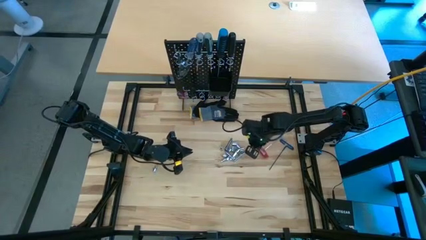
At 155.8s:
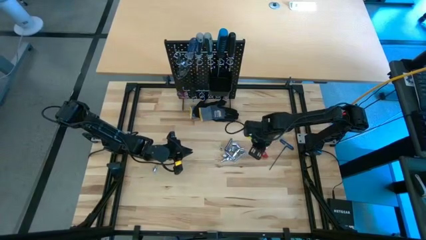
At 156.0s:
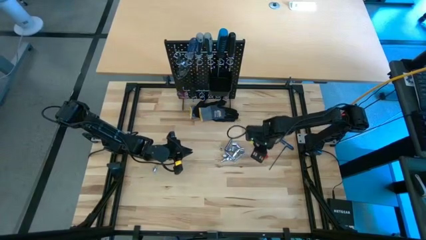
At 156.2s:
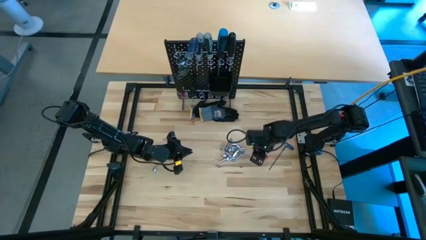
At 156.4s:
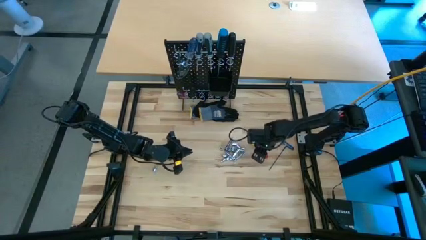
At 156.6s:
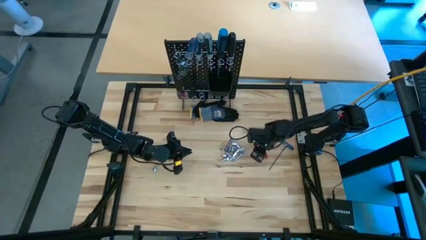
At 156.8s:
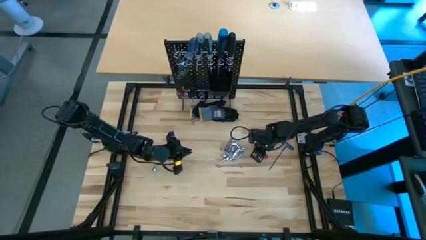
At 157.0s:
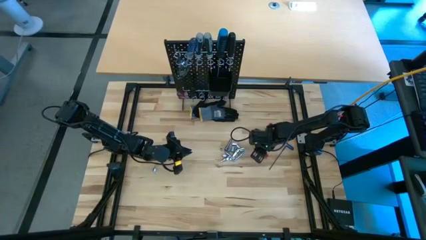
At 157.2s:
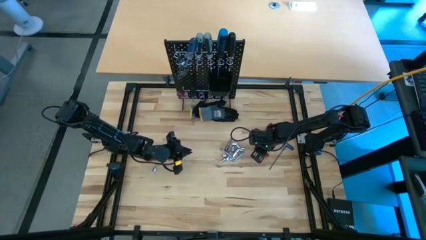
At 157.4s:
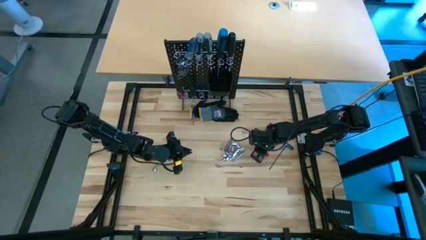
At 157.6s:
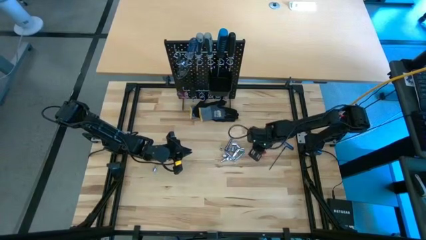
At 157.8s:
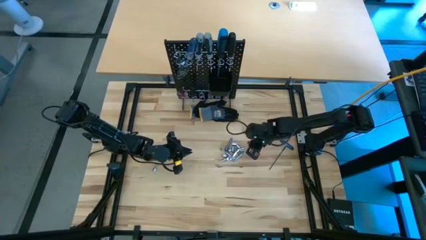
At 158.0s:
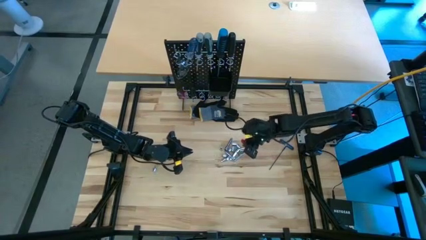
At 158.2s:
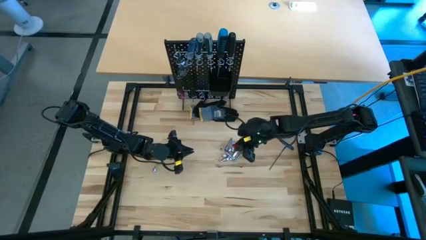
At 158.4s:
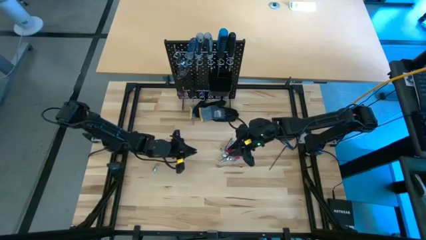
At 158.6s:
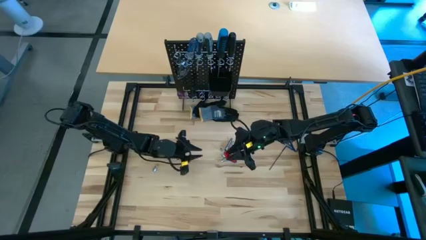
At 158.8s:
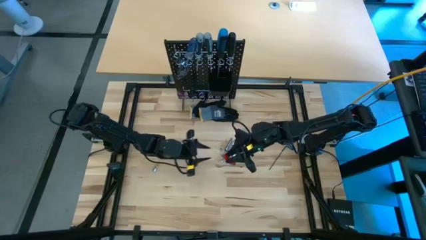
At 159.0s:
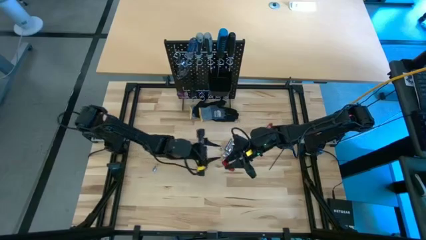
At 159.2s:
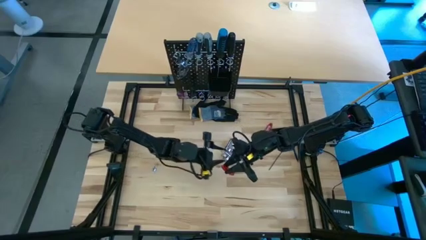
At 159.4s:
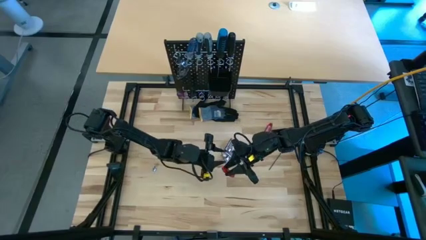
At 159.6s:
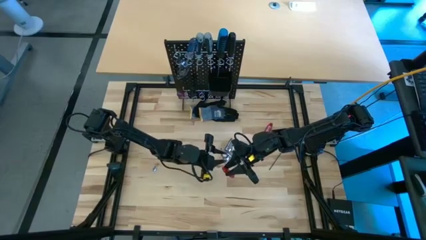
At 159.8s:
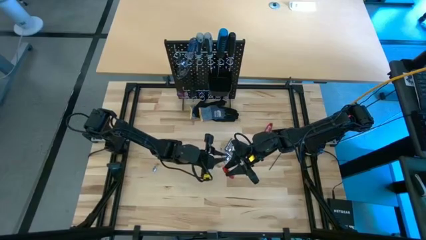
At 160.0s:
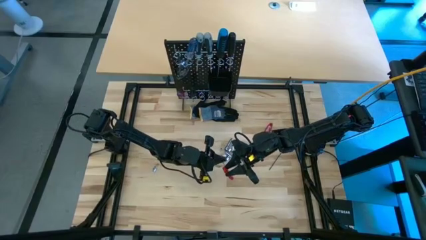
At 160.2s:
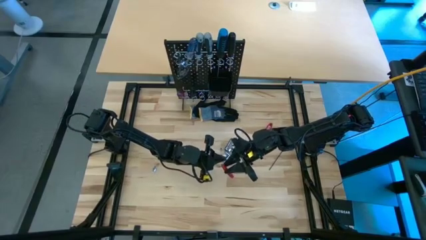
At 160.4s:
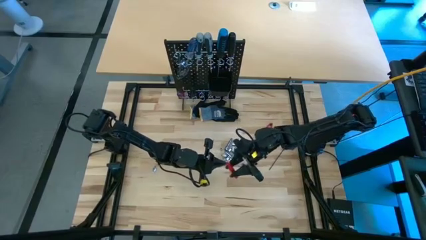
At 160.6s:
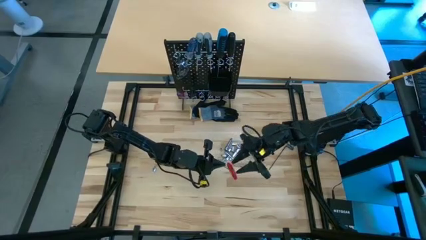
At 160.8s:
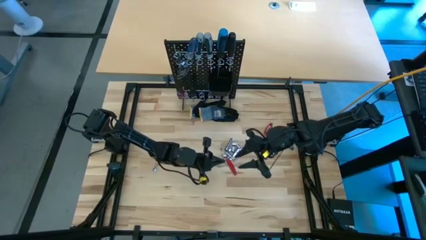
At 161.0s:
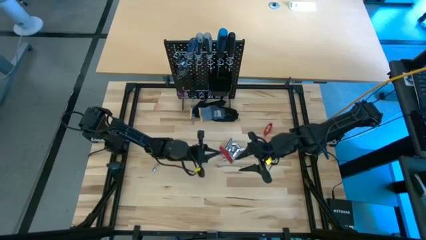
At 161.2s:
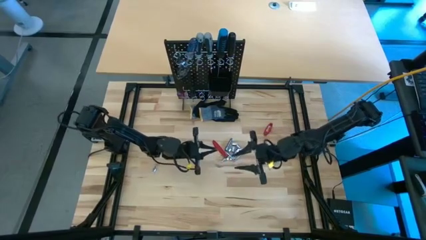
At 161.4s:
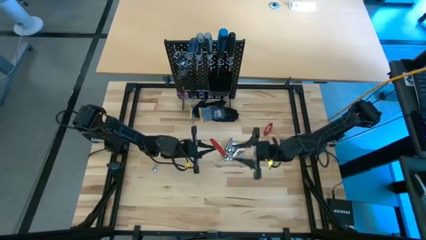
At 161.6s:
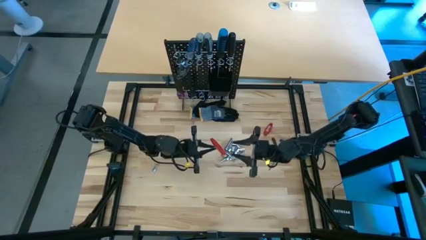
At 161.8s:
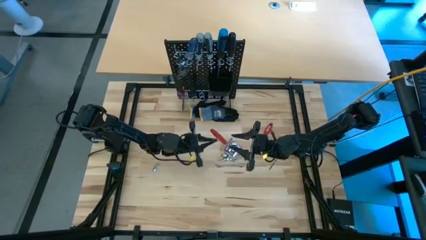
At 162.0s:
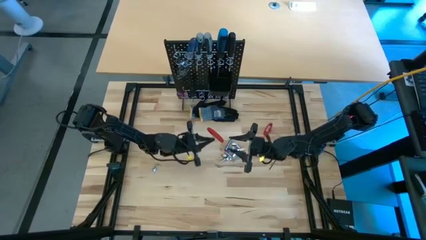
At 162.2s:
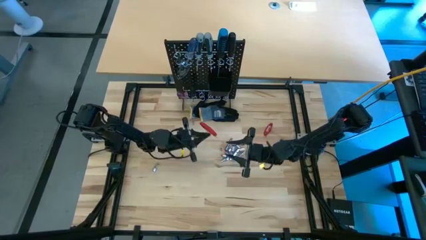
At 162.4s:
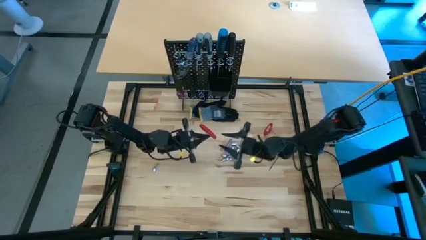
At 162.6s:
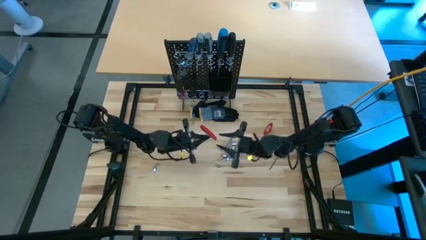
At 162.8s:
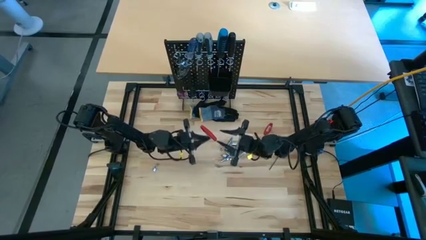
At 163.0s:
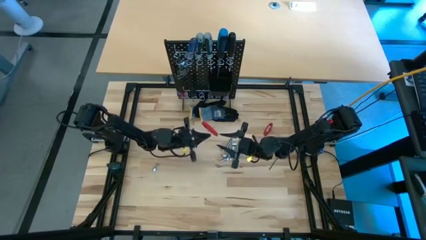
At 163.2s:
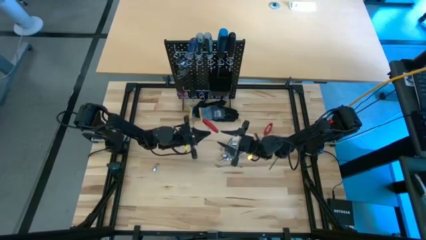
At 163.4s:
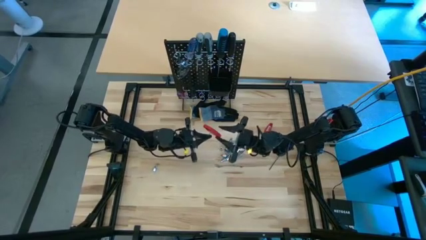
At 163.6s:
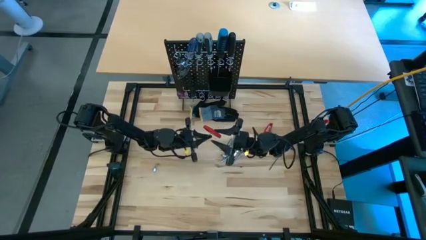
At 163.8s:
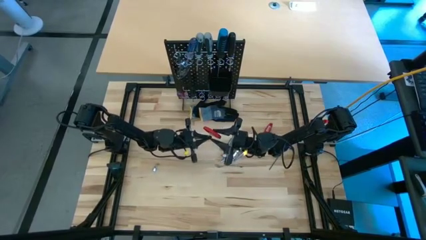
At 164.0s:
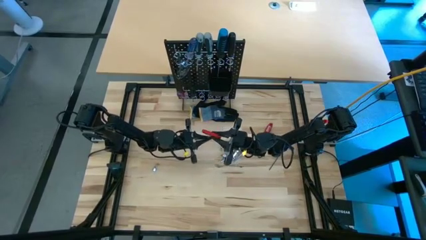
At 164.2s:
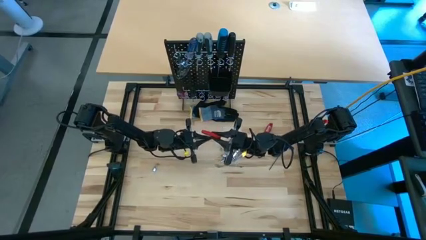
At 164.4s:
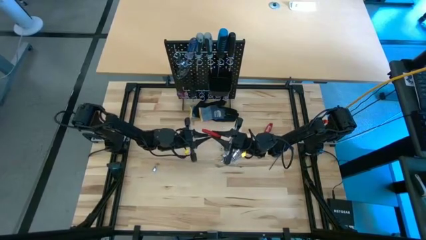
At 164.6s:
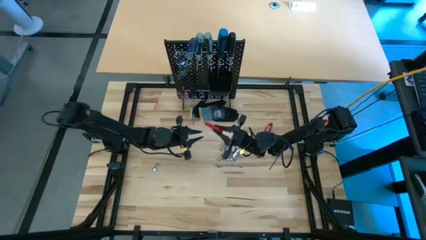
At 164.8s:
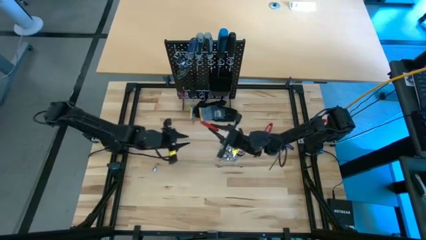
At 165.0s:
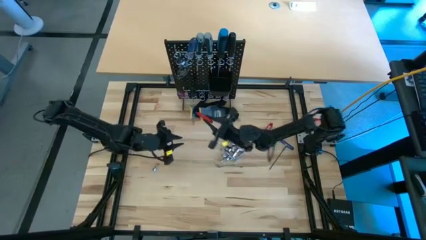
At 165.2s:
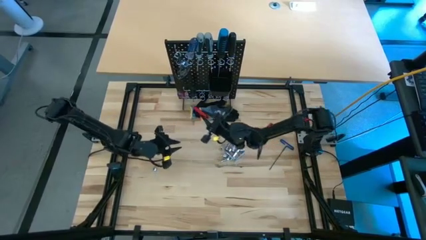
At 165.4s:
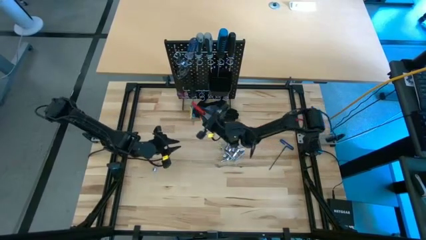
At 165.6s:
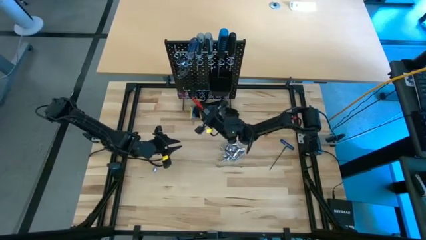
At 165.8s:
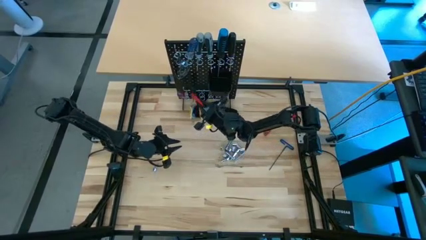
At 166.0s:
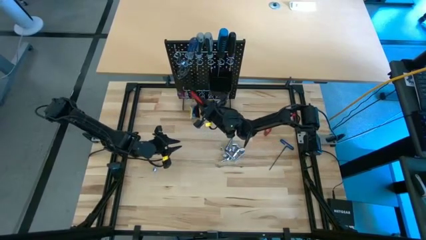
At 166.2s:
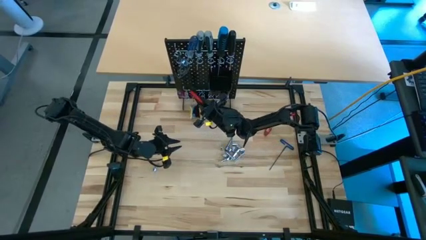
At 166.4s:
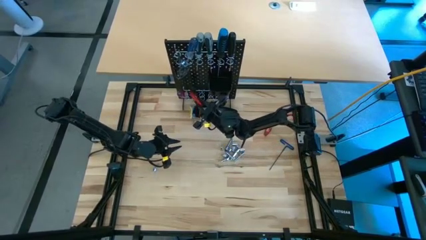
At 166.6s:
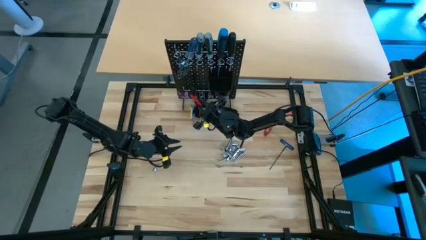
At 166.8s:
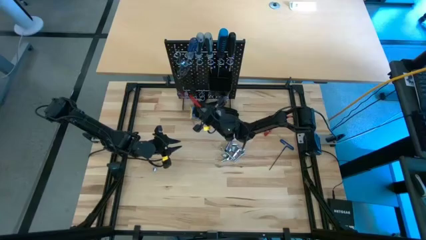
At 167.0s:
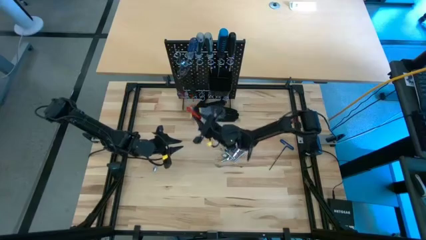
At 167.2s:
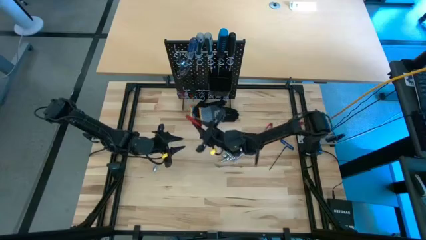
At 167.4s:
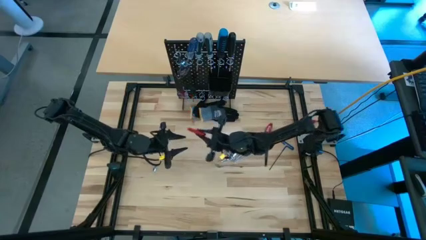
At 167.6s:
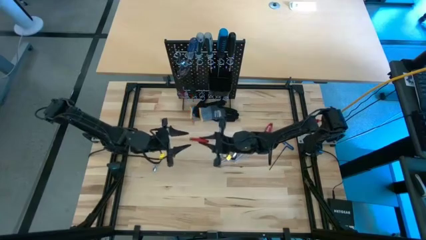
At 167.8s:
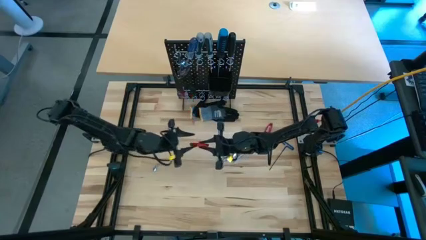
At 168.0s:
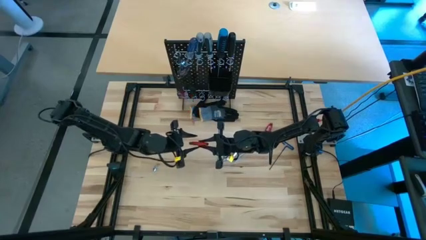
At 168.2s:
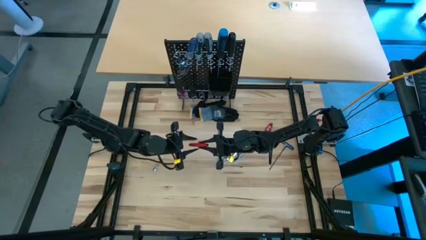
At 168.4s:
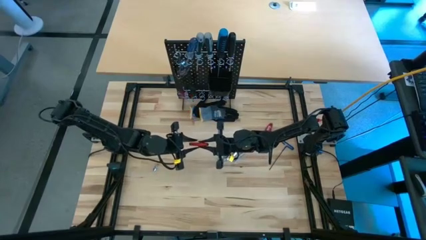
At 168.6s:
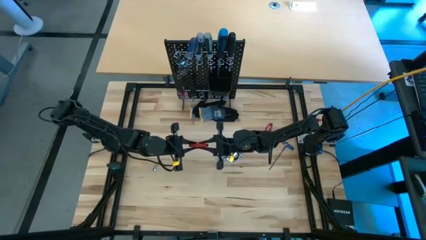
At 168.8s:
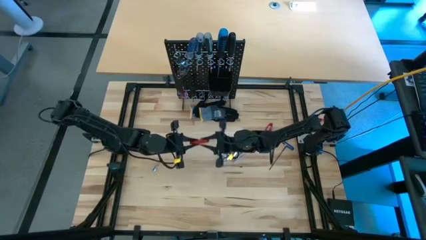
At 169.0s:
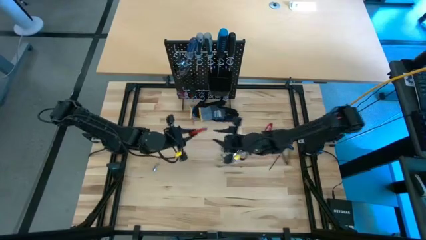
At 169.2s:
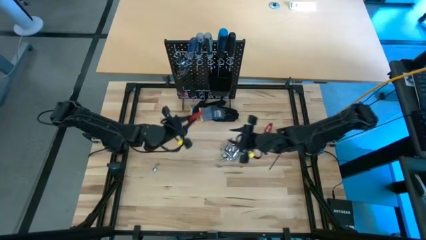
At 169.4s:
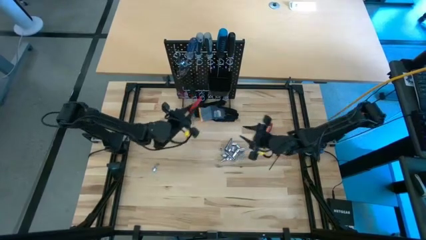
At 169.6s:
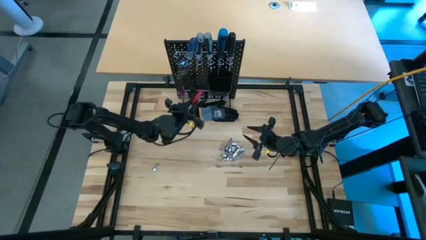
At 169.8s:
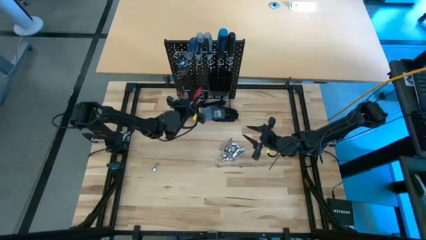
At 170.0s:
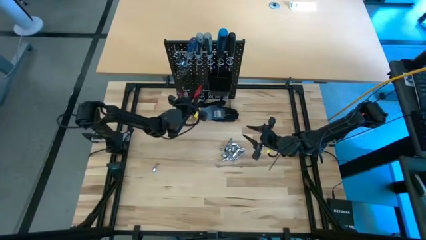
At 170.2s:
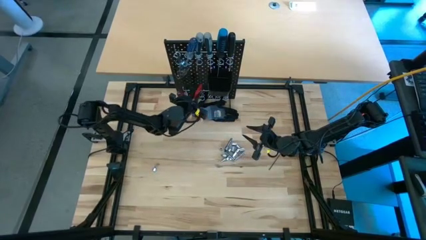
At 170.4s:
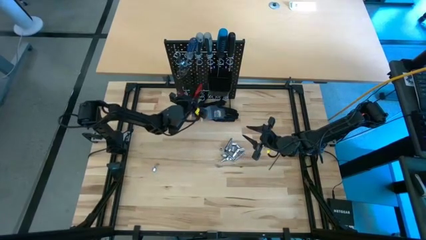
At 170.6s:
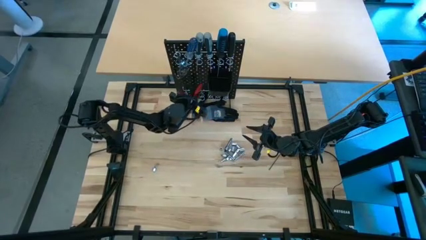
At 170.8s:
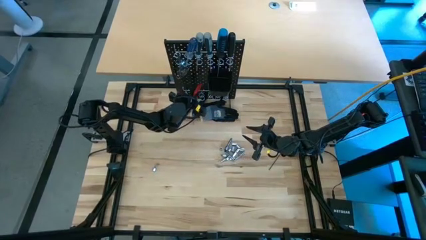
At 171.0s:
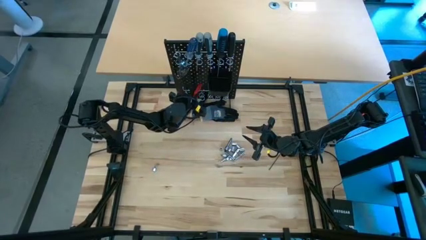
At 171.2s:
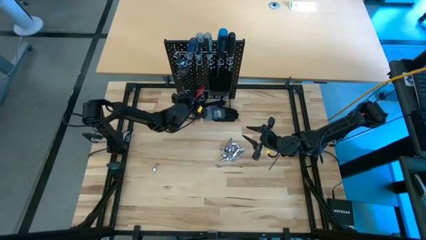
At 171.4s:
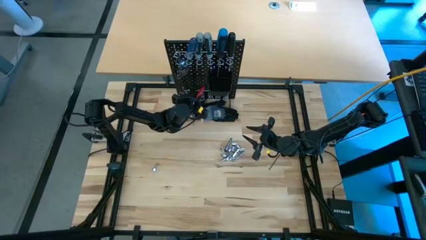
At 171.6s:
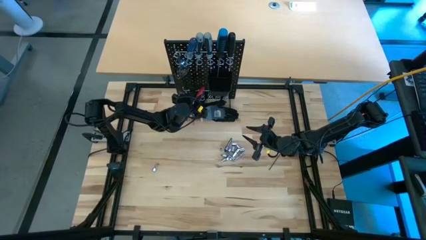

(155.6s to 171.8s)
Task: Hang tools onto peg board
Hang the bottom red allen wrench on the pegboard

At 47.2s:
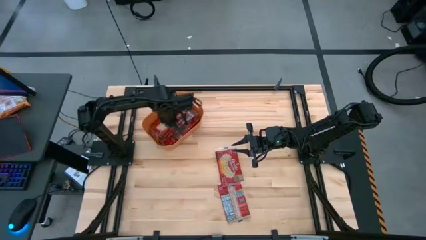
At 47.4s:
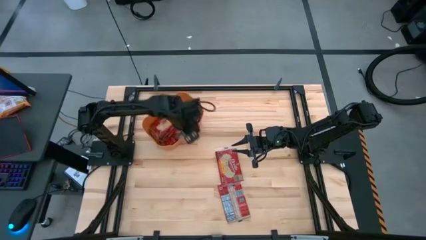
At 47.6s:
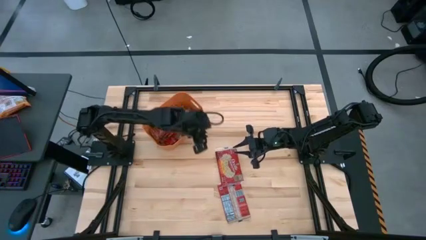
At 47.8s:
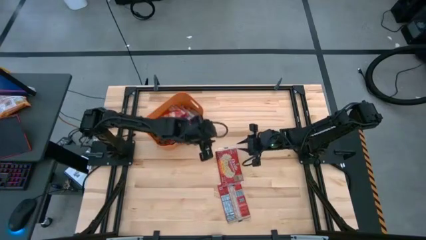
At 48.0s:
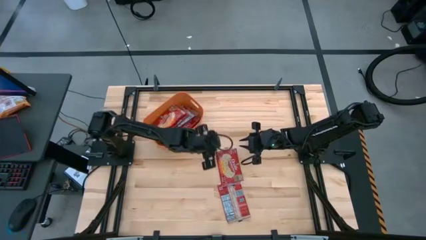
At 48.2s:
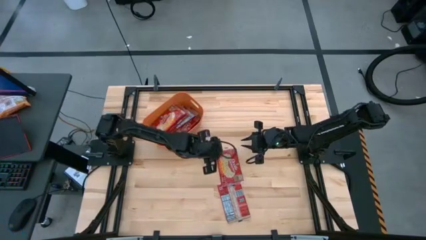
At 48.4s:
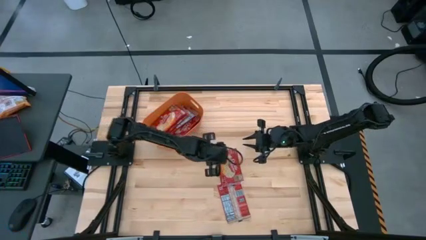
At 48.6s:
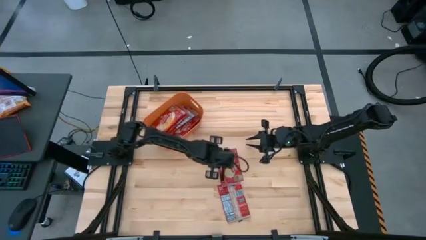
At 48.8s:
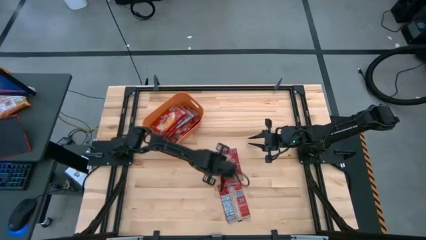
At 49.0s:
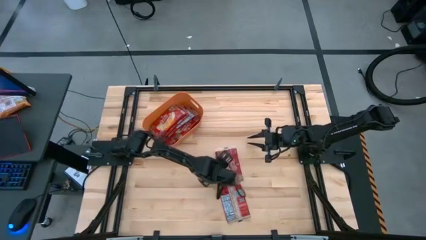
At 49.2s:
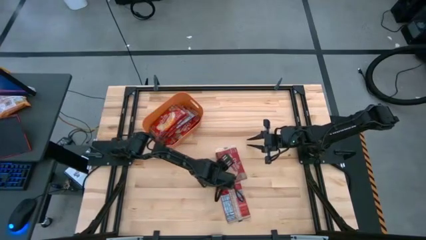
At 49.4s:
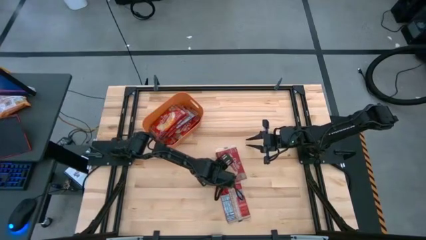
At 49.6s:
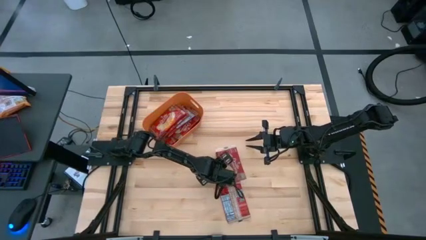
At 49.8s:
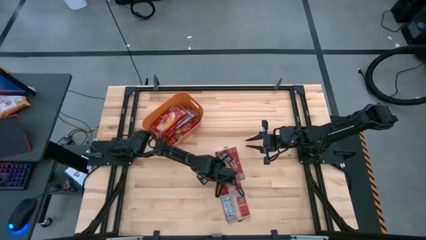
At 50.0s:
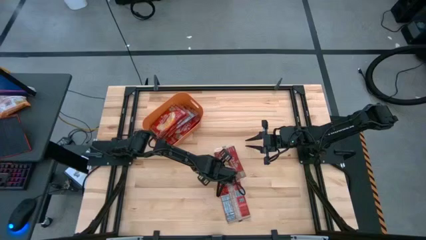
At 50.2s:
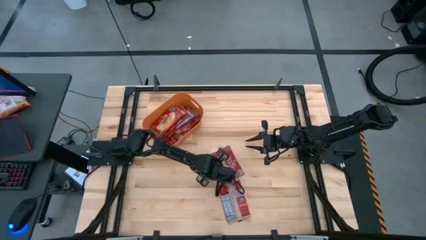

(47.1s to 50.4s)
Task: Sort popcorn bags into baskets
Put the red popcorn bag into the orange bin
